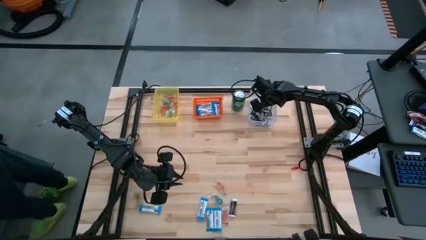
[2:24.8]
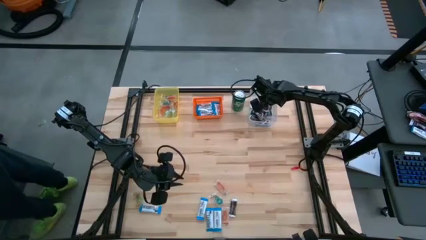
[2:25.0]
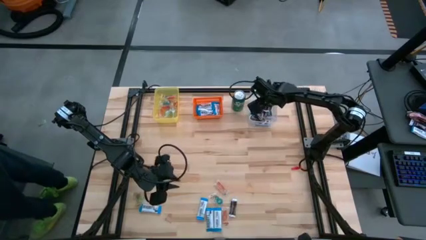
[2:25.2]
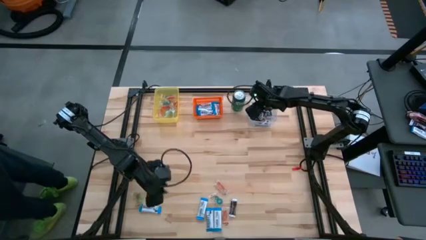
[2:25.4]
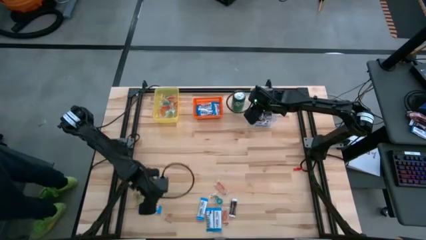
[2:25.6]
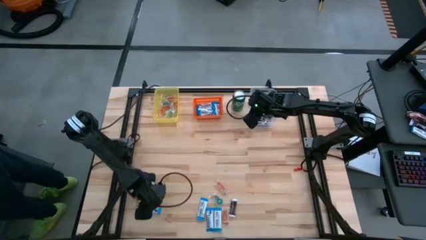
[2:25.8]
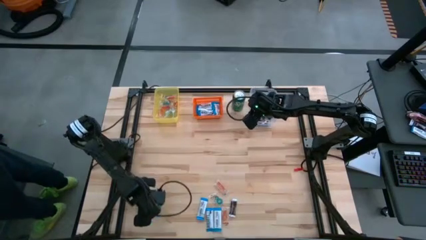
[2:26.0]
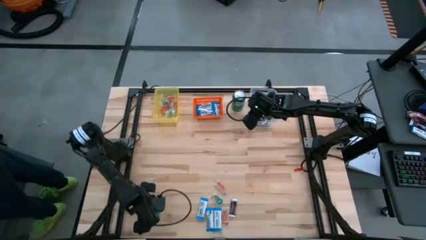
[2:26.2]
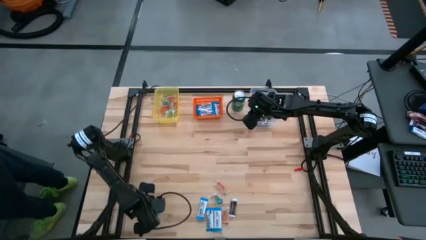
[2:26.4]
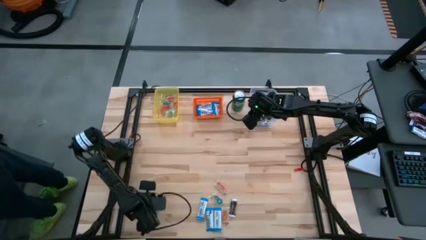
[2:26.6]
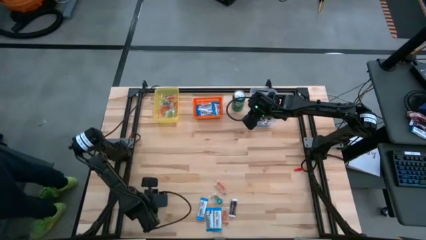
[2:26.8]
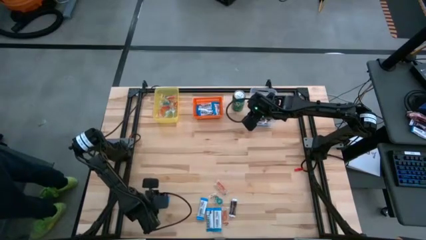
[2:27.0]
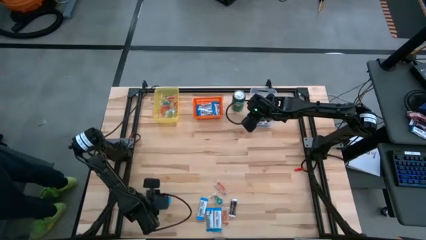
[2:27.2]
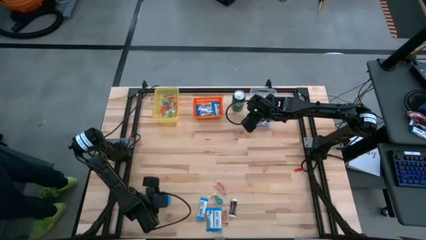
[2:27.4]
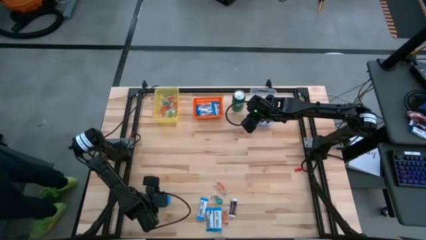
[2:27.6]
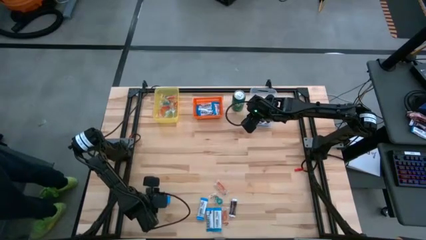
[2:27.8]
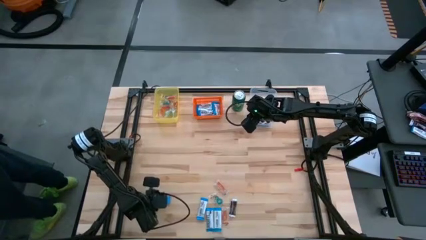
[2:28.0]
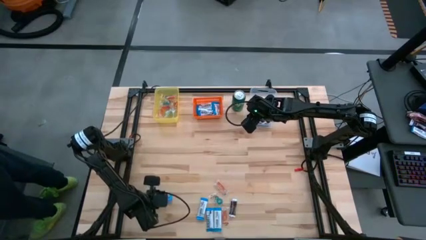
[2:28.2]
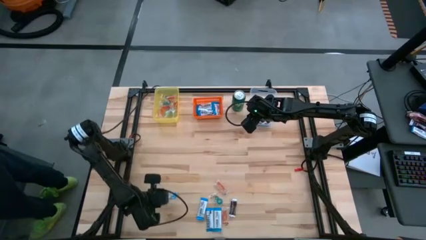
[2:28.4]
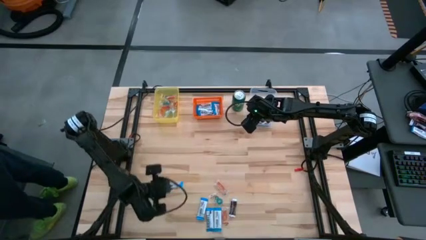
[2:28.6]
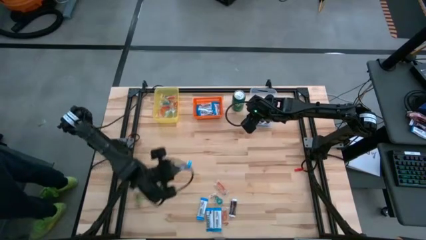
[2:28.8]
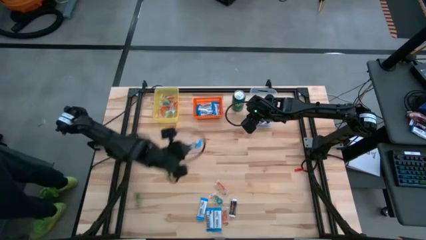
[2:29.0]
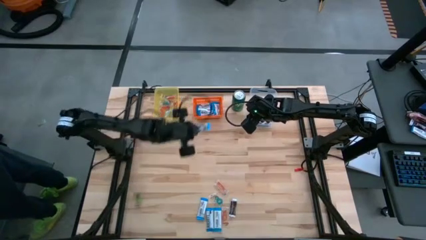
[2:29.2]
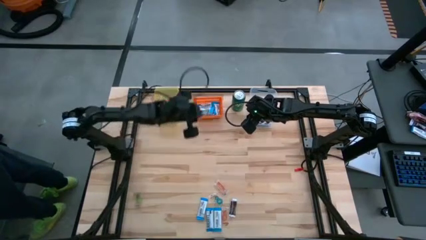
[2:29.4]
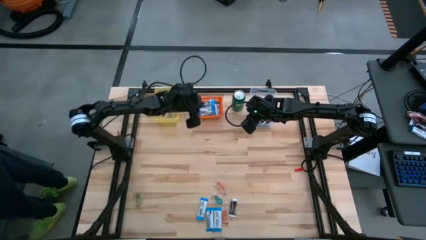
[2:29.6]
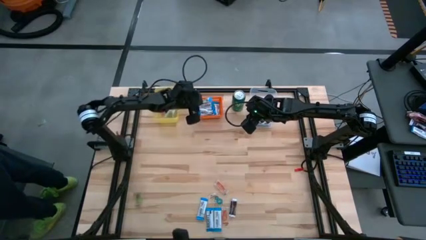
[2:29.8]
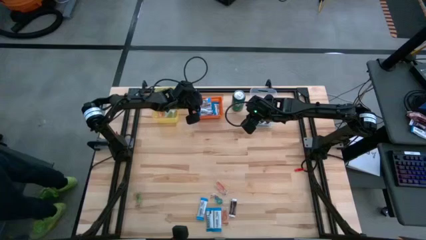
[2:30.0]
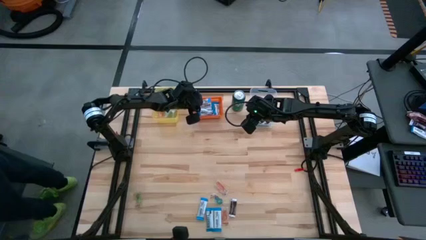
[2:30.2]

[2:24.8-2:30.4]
Task: Organize candy in baskets
Put the white chocolate into the orange bin

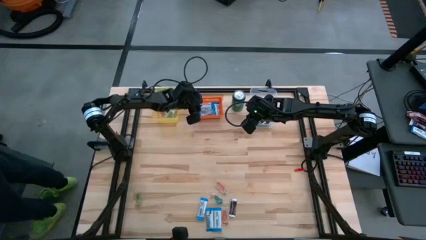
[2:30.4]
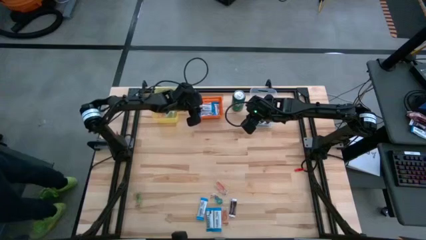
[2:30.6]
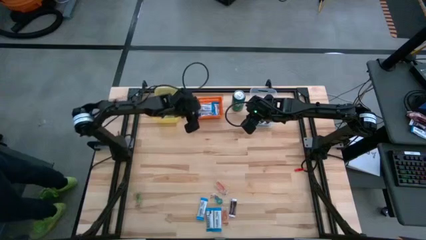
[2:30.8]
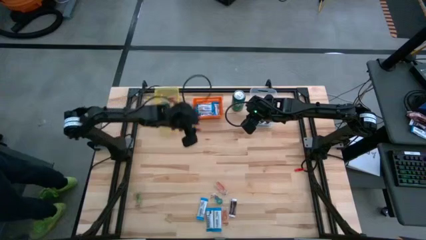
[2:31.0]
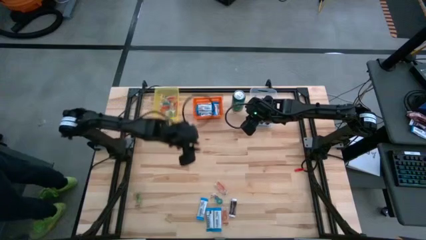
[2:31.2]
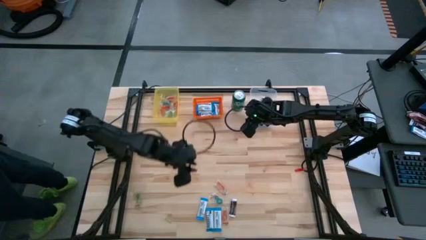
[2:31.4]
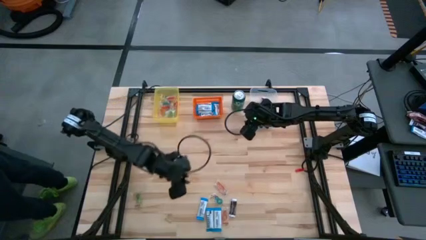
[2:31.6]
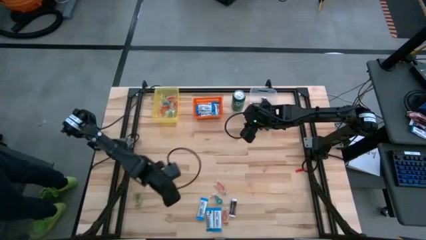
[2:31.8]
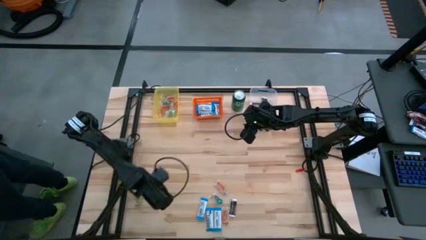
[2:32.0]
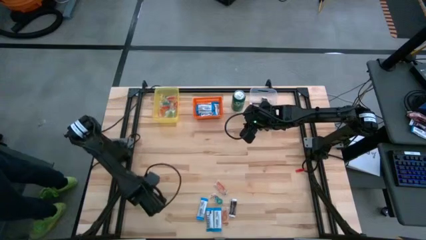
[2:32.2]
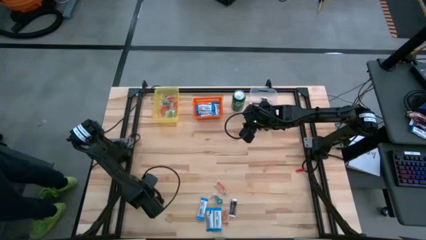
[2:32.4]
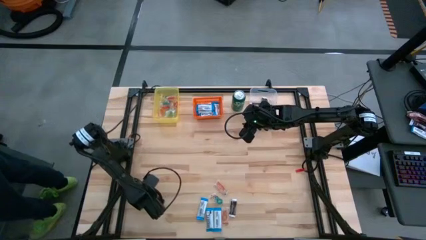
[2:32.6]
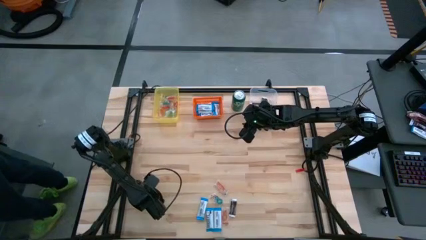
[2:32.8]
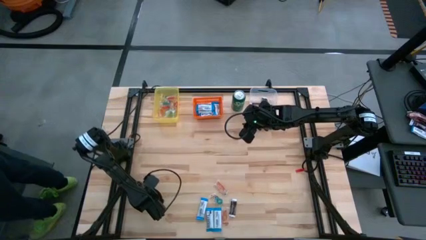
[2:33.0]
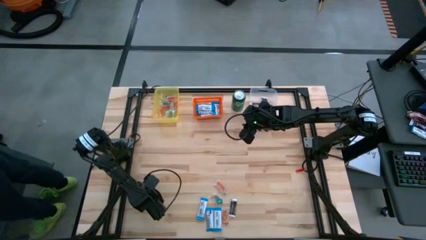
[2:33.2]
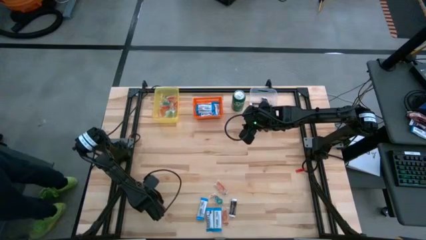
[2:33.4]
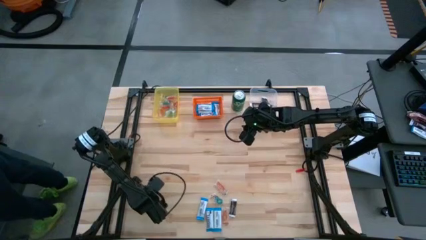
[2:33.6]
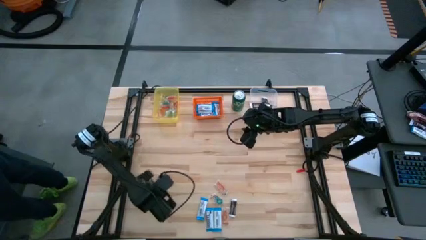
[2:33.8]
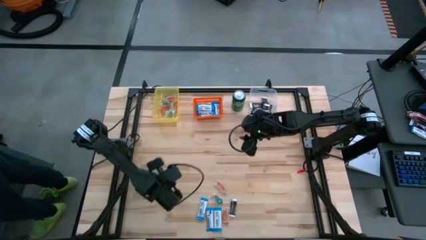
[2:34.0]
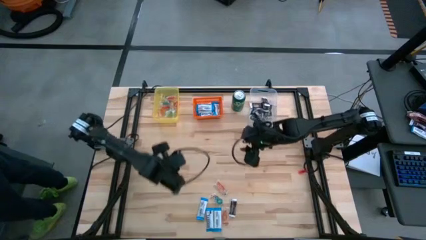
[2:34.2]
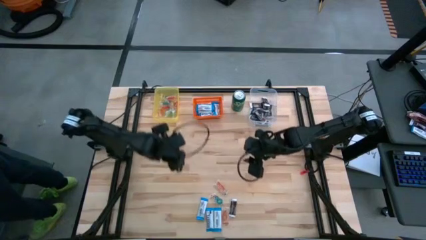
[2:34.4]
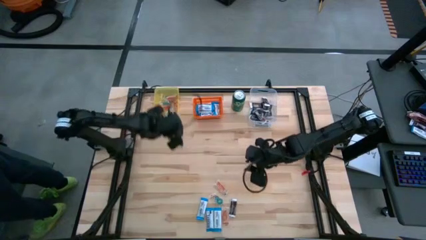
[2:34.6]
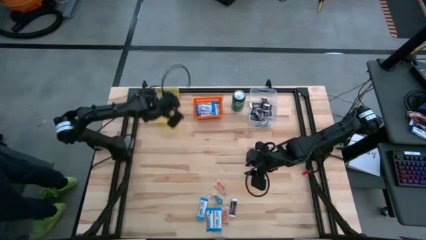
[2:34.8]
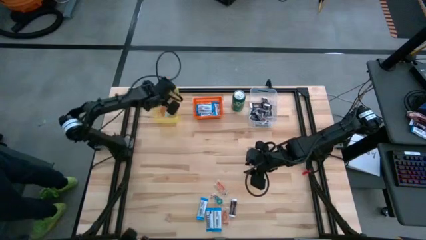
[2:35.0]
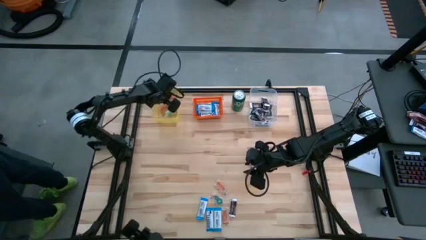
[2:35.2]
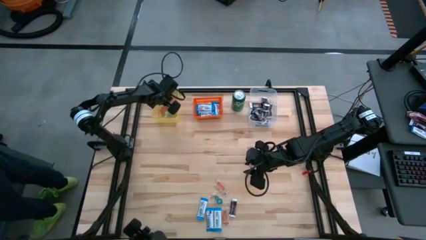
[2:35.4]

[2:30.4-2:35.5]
Put the green gummy into the yellow bin

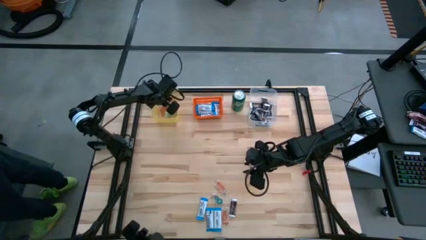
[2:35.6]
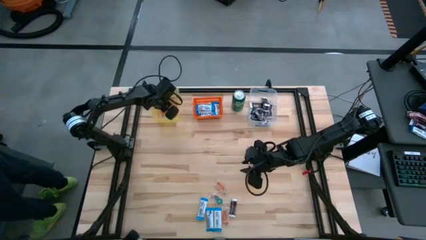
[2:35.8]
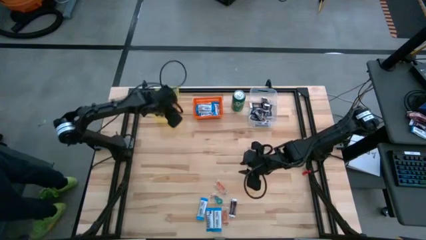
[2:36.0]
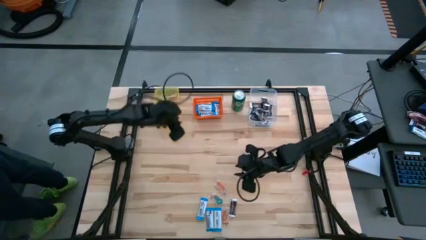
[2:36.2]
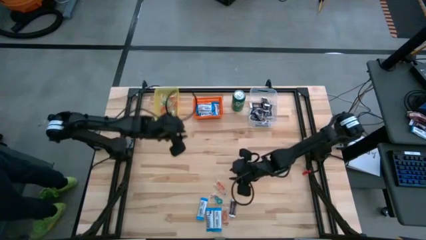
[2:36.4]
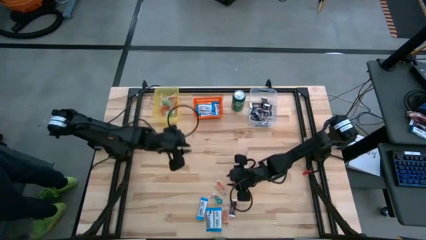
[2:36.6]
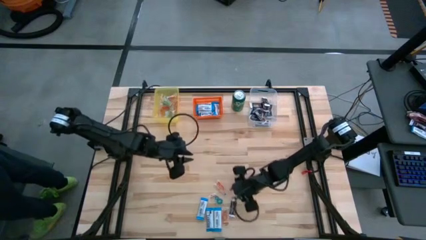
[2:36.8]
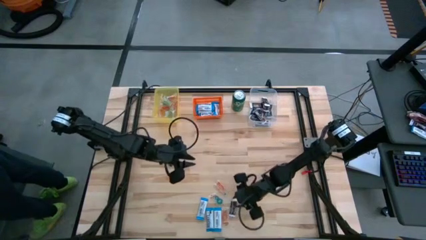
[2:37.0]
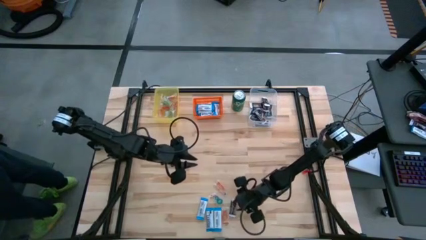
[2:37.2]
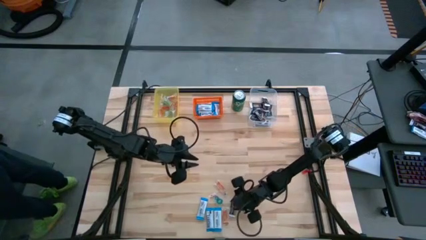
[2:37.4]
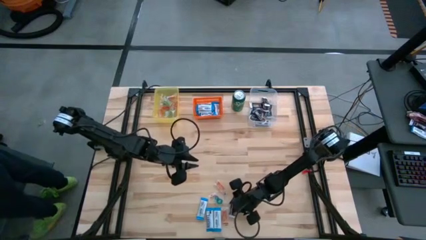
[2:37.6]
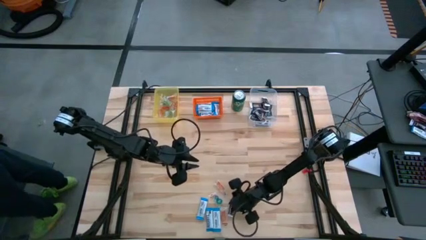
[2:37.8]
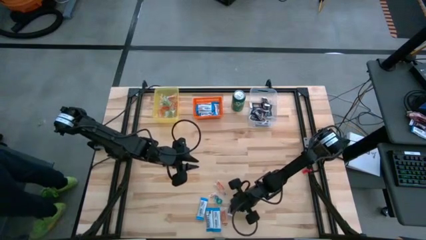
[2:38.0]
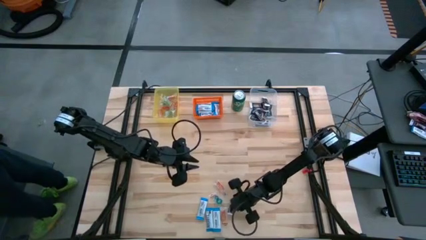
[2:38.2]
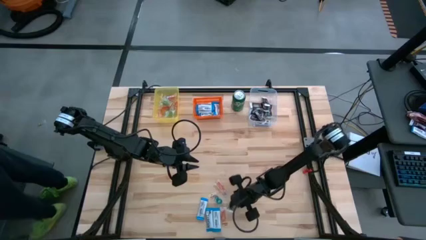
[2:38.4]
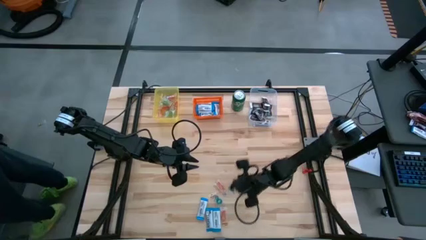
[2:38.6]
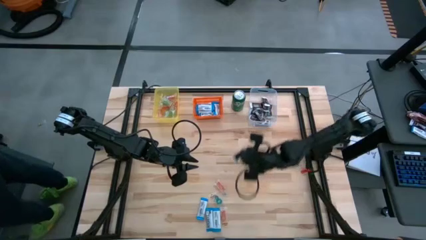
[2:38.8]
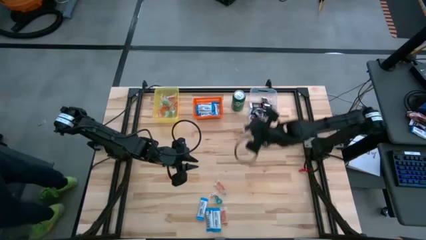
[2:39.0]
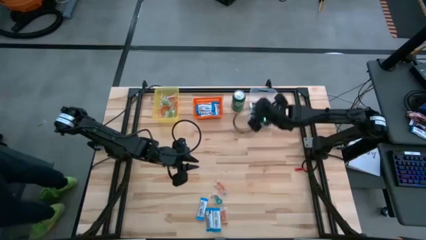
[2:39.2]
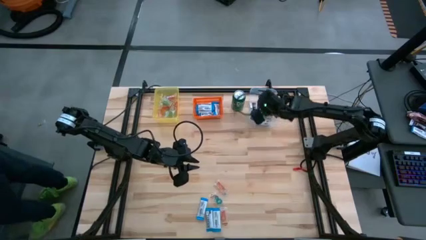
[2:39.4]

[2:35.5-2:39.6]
Put the brown chocolate into the transparent bin

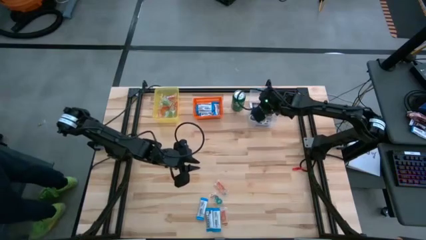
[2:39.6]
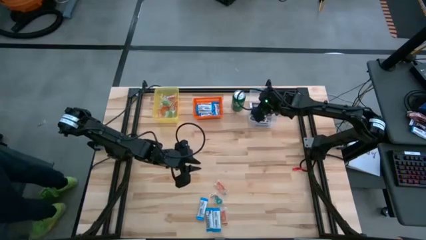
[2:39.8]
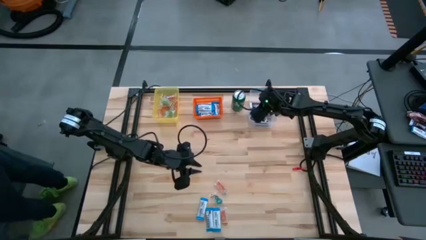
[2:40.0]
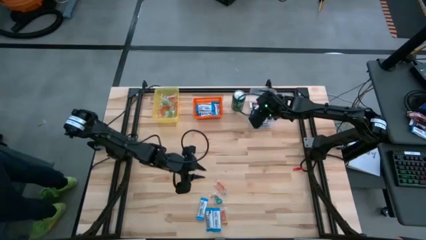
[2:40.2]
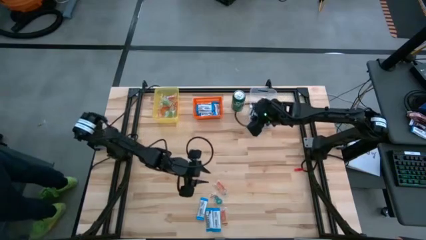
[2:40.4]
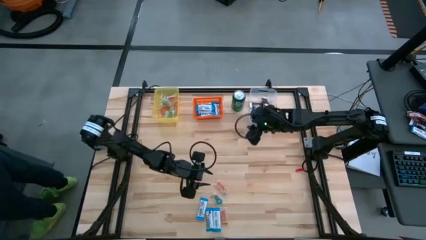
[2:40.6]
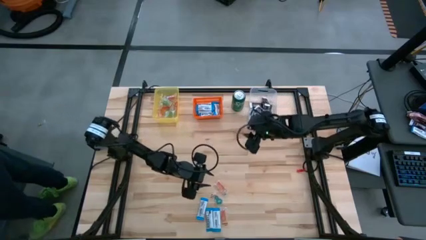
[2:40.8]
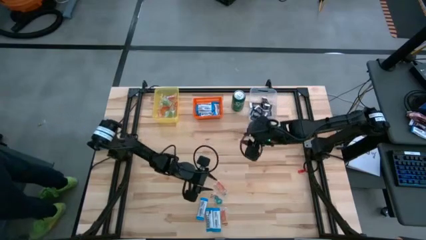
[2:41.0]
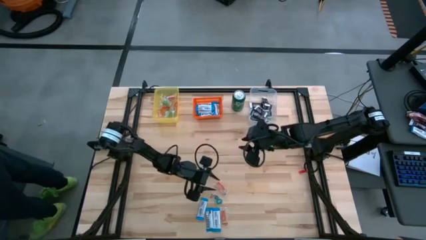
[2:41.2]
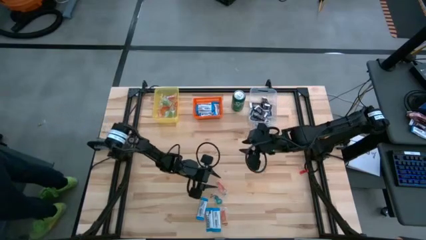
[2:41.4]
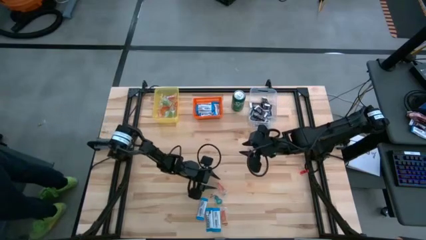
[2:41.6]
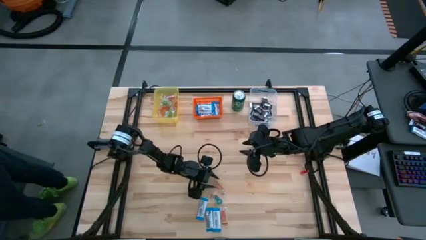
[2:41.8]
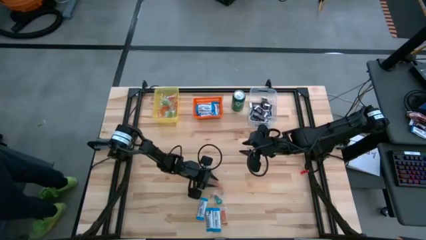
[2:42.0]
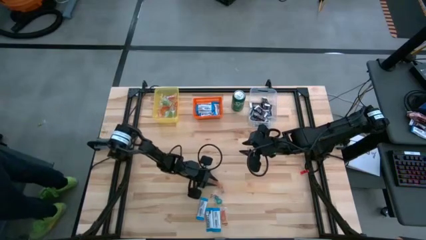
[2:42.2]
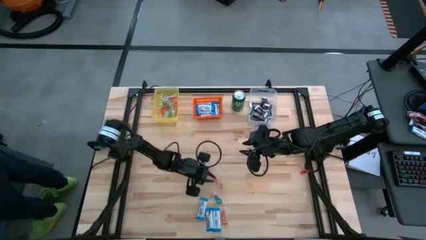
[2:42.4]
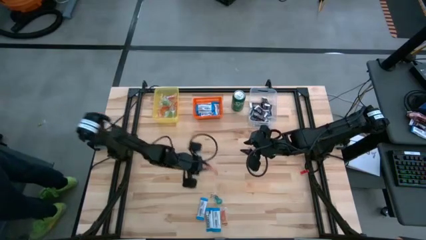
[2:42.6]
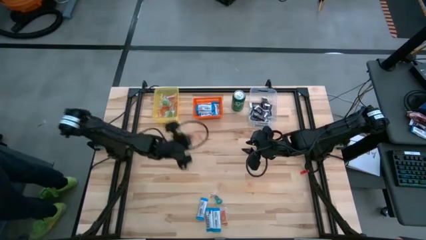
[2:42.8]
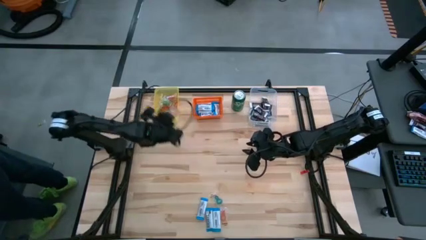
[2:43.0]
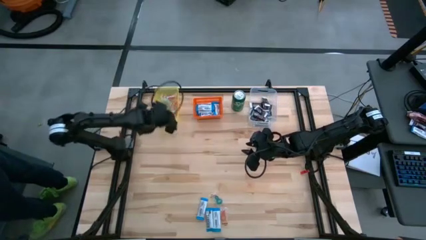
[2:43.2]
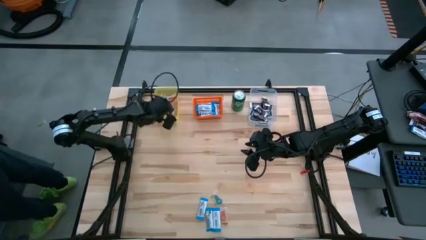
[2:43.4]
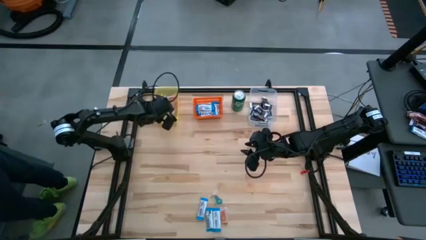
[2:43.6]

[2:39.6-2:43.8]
Put the orange gummy into the yellow bin
